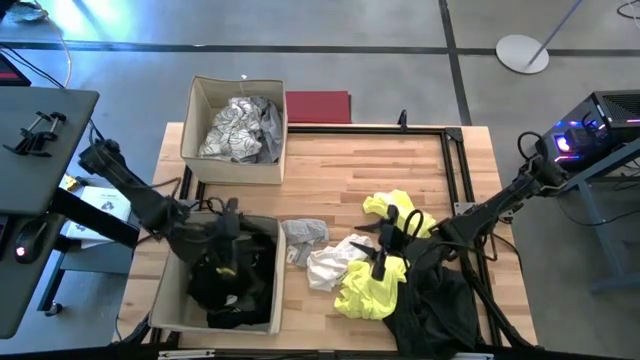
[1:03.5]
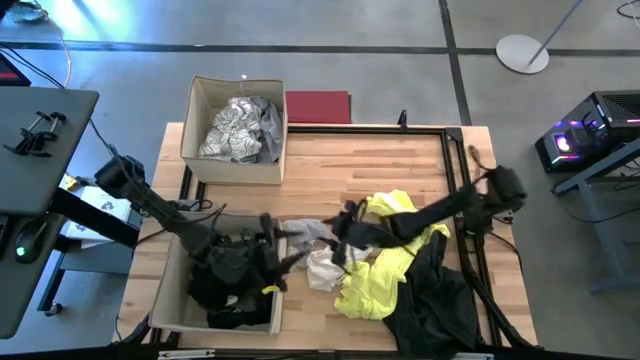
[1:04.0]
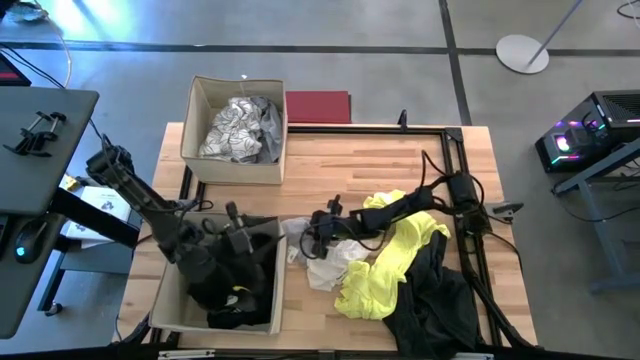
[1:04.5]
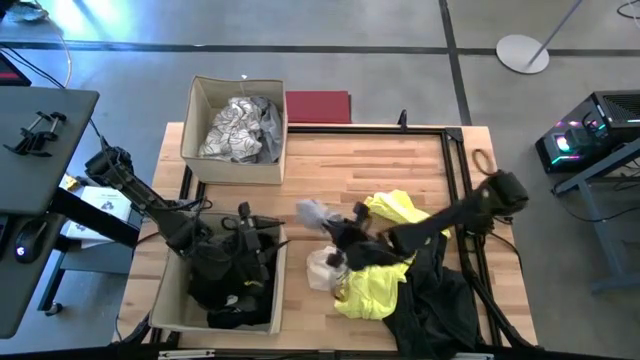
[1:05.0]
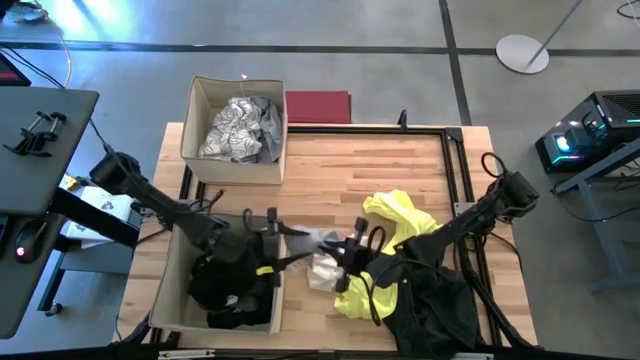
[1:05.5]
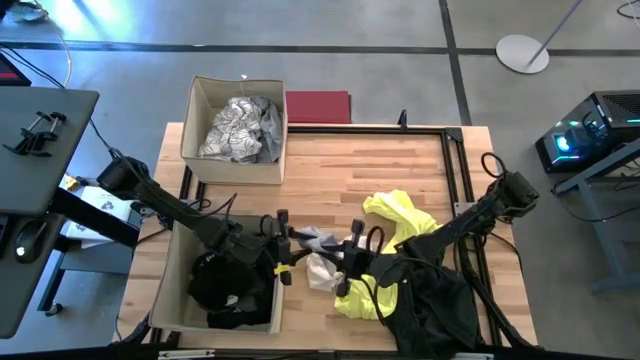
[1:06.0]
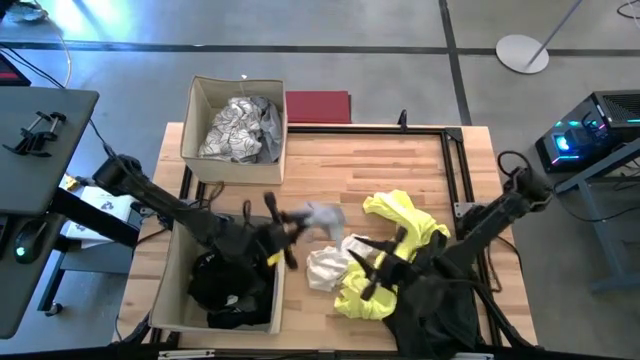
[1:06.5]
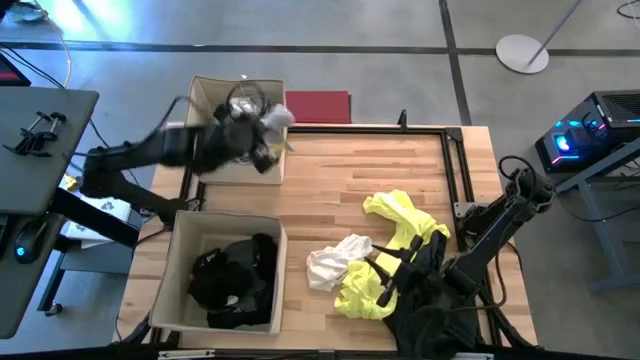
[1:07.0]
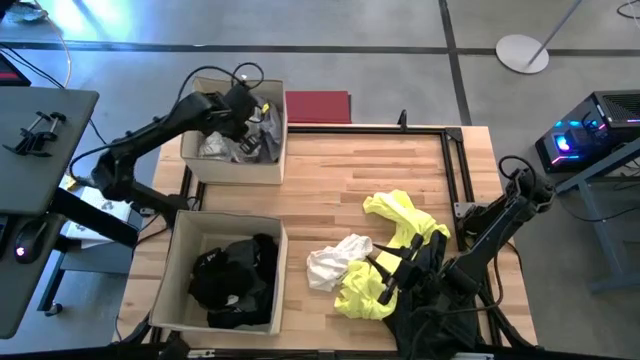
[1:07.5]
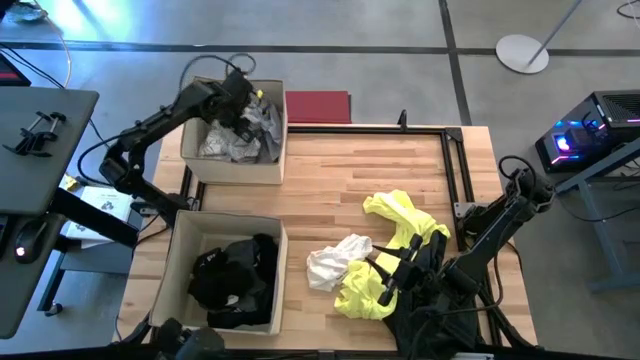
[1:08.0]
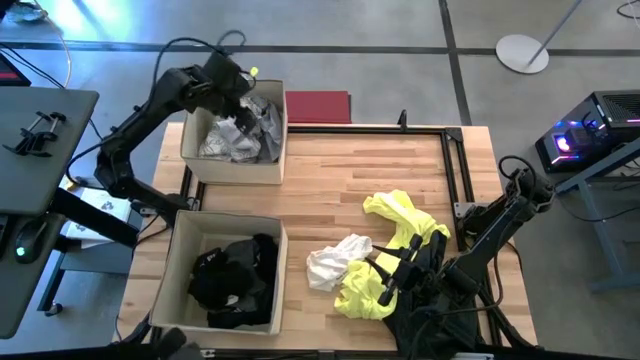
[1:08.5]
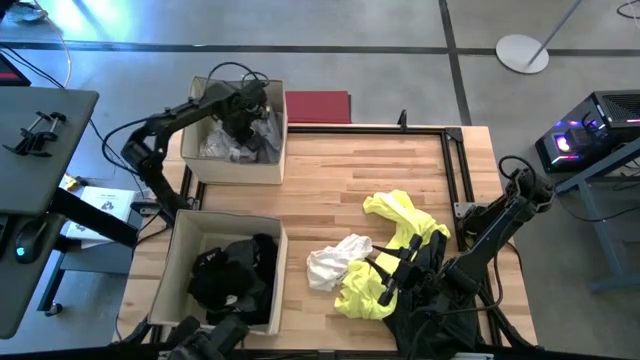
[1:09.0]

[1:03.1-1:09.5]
Task: Sort clothes
Put the gray shorts into the top laundry organizer

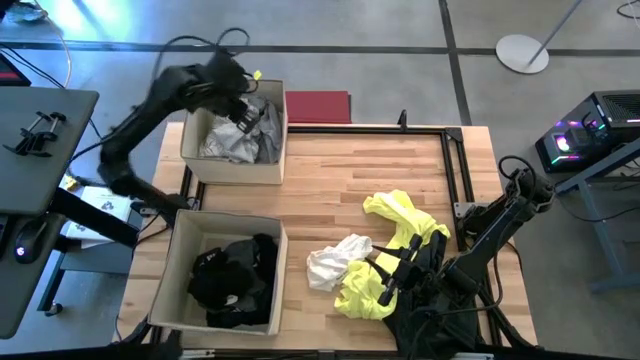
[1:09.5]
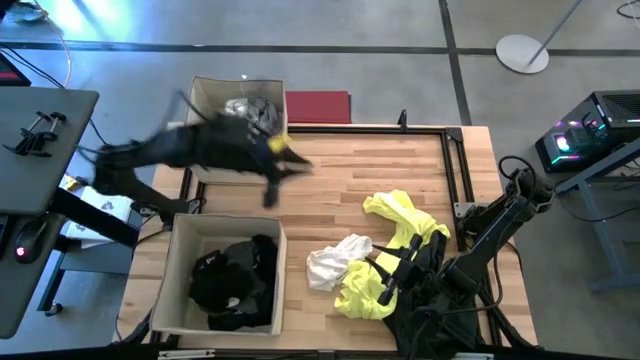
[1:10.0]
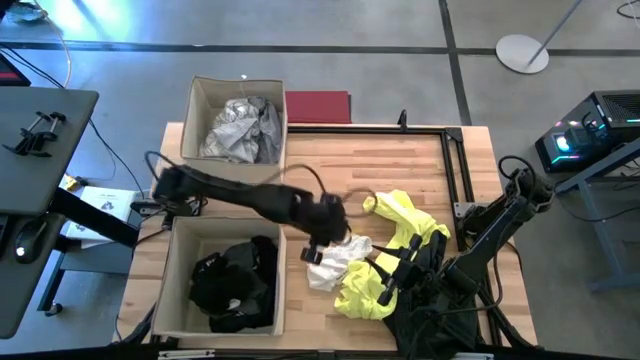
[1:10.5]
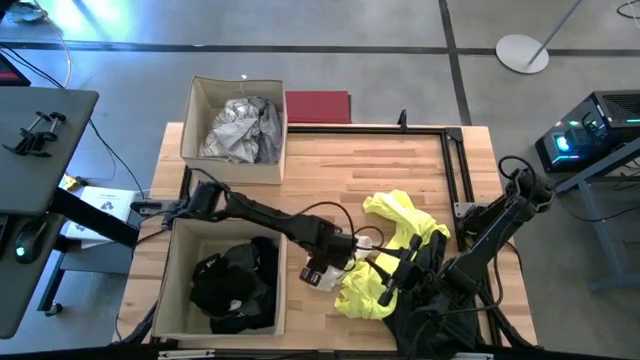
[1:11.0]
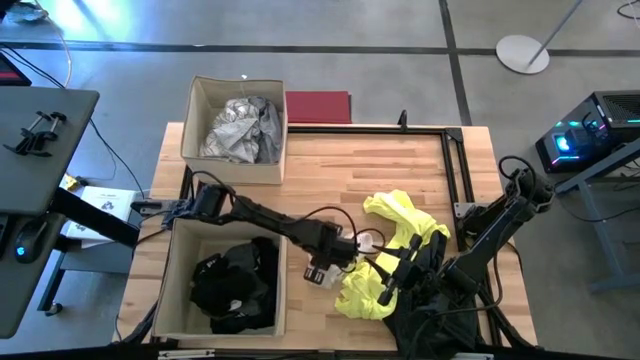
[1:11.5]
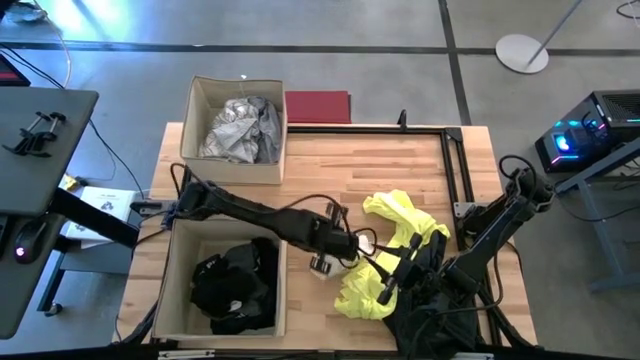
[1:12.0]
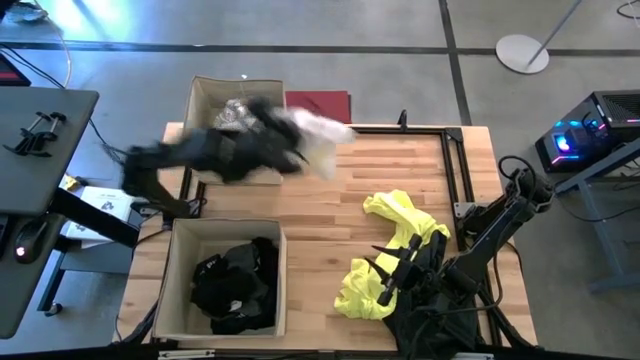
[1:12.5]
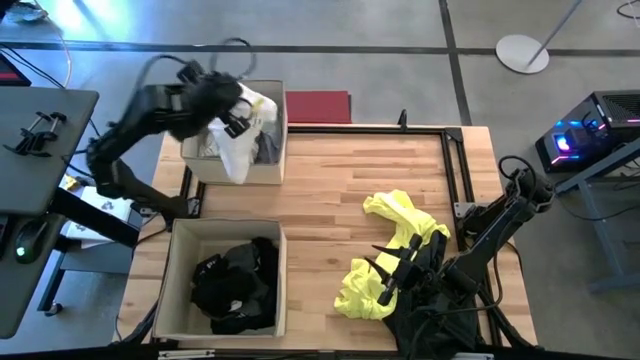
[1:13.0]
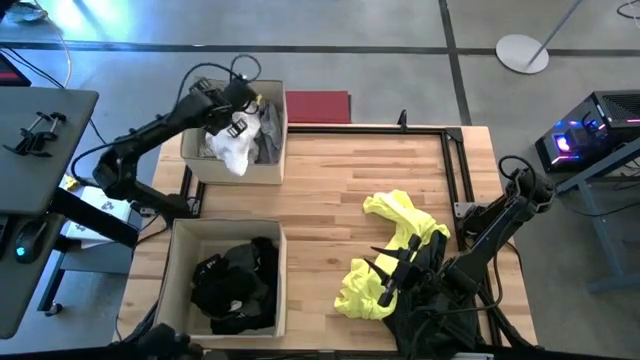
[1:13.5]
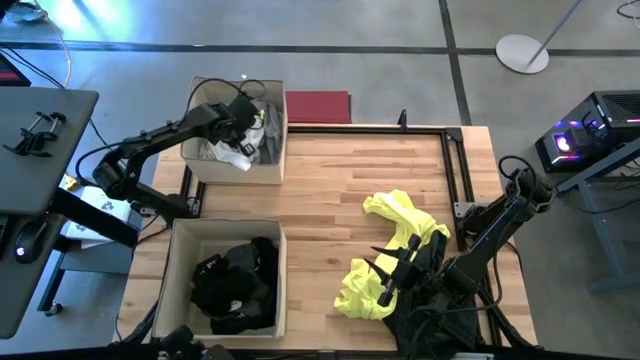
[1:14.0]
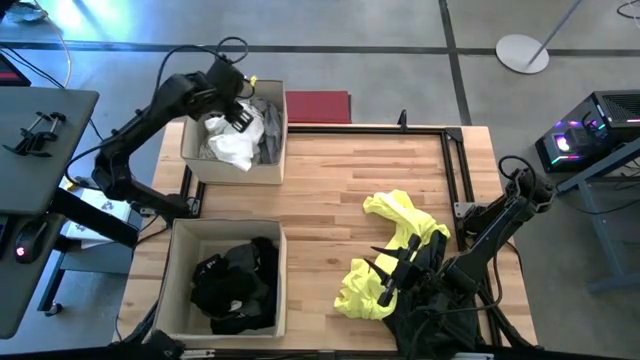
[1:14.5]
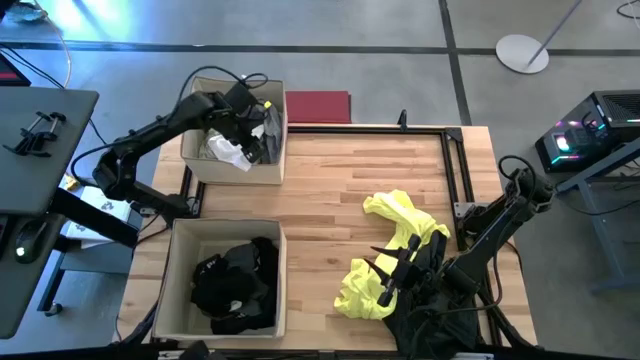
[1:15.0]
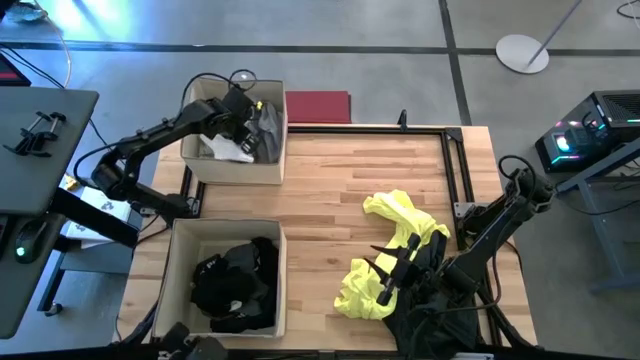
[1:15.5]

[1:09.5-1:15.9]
Put the white shorts into the top laundry organizer

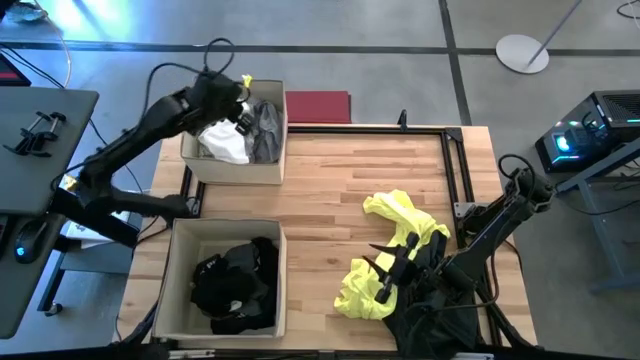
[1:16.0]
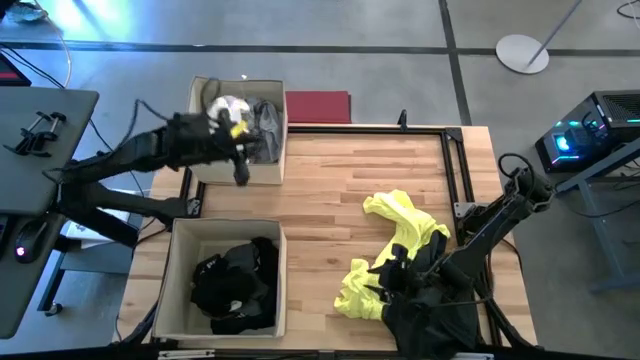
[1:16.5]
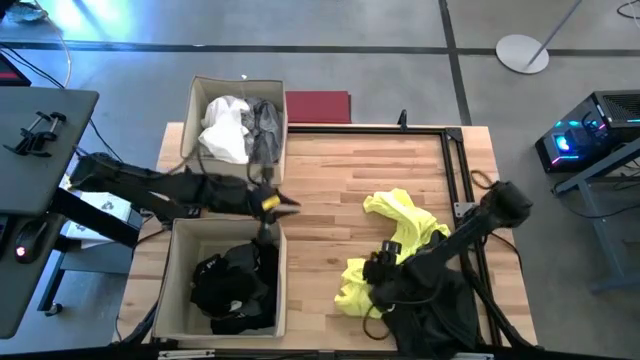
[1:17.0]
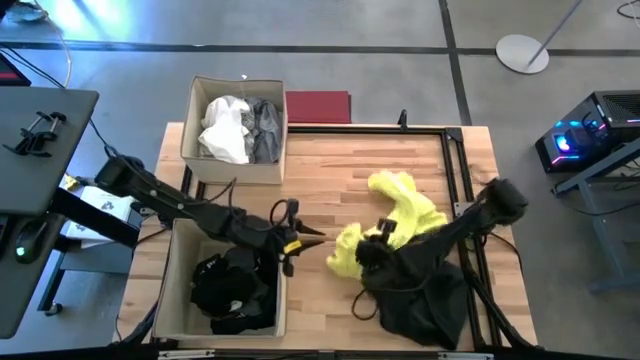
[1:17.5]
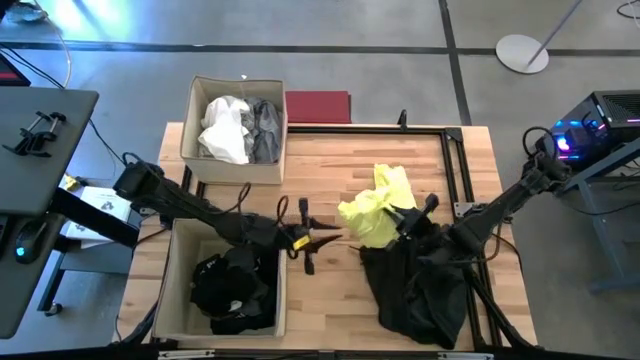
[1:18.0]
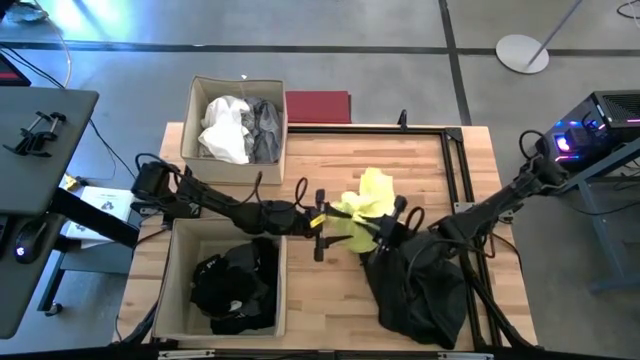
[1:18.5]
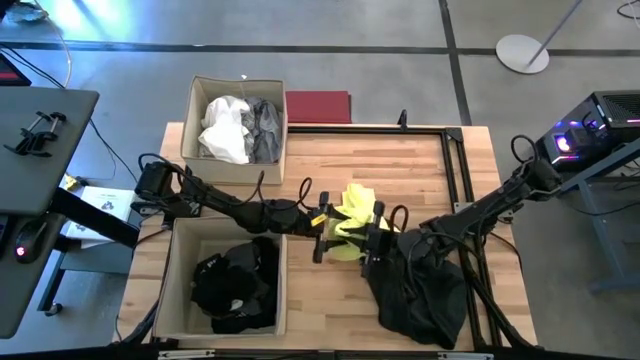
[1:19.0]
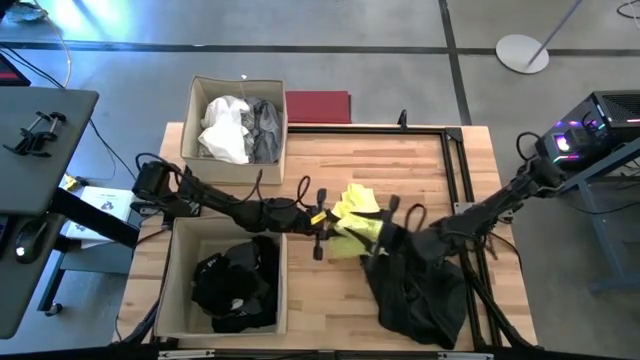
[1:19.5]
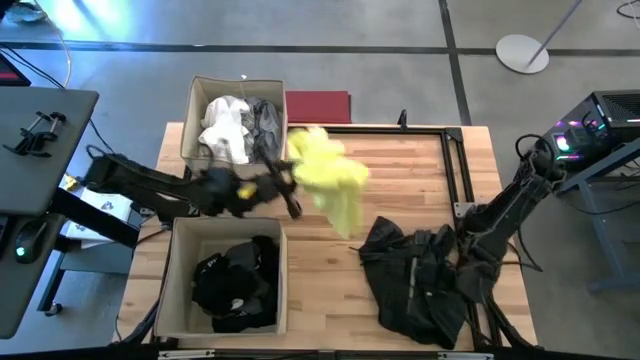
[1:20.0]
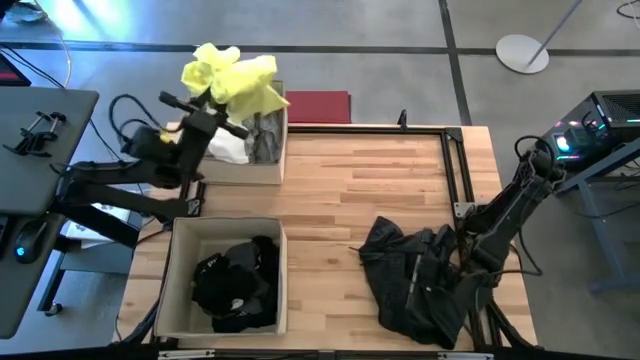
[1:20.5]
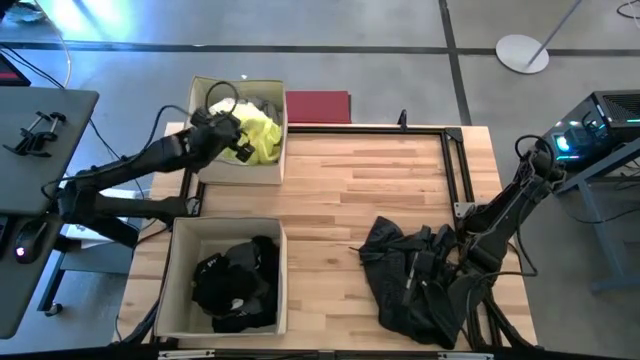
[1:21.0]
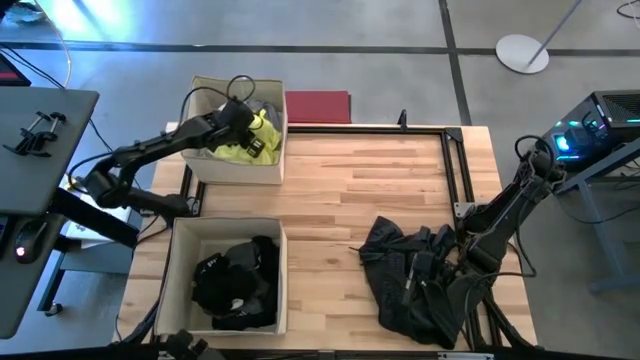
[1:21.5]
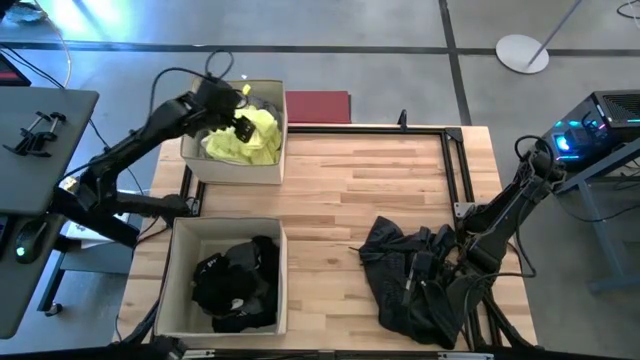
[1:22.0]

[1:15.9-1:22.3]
Put the yellow towel into the top laundry organizer

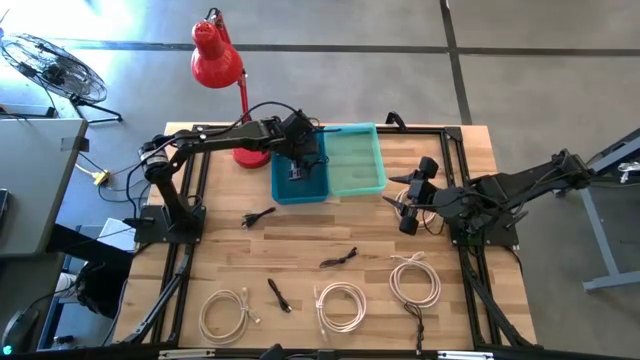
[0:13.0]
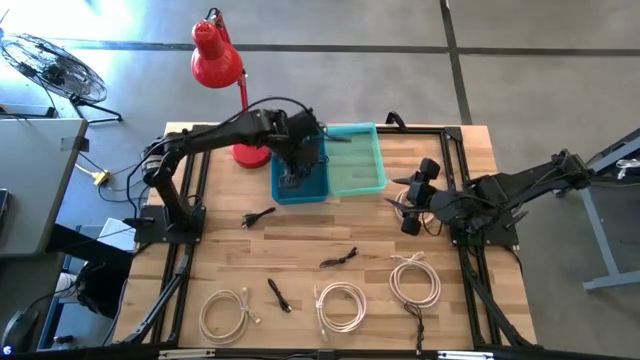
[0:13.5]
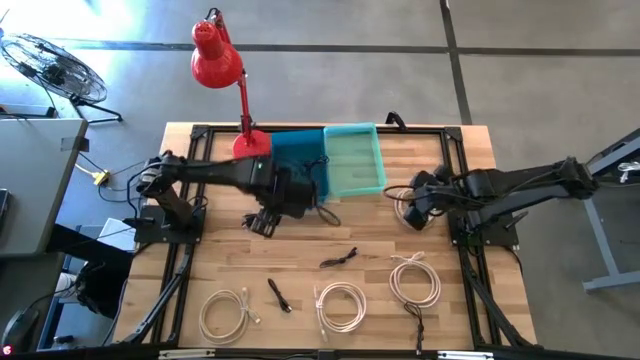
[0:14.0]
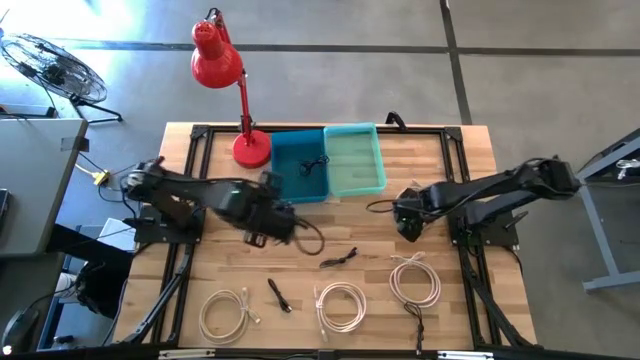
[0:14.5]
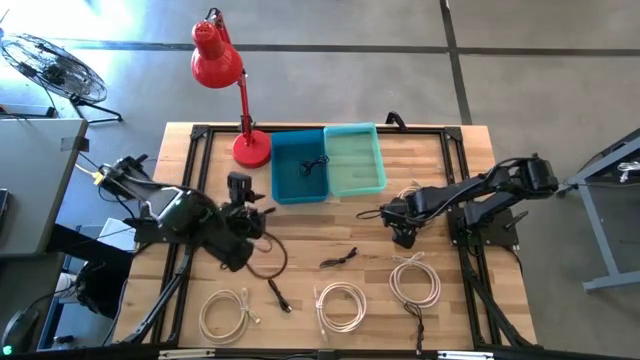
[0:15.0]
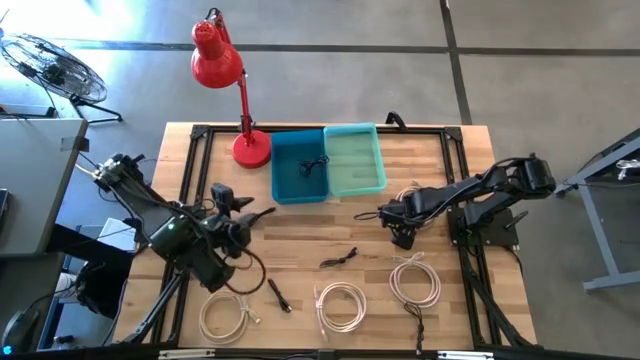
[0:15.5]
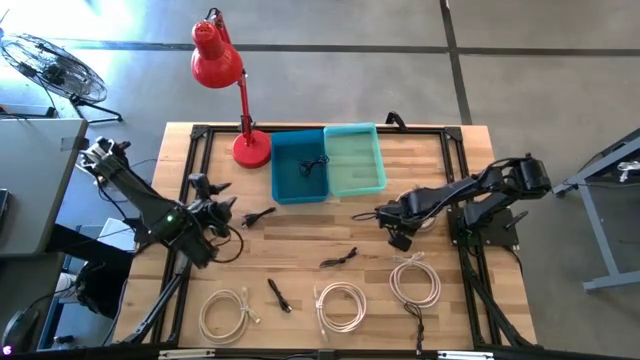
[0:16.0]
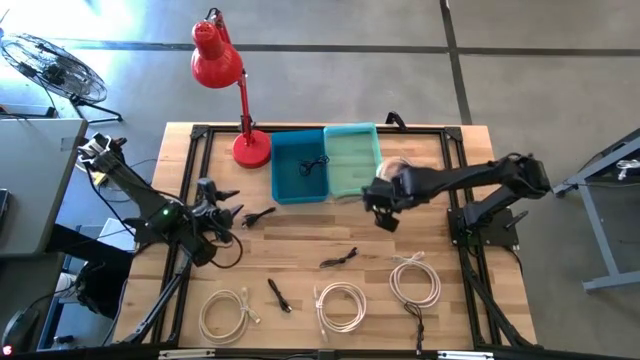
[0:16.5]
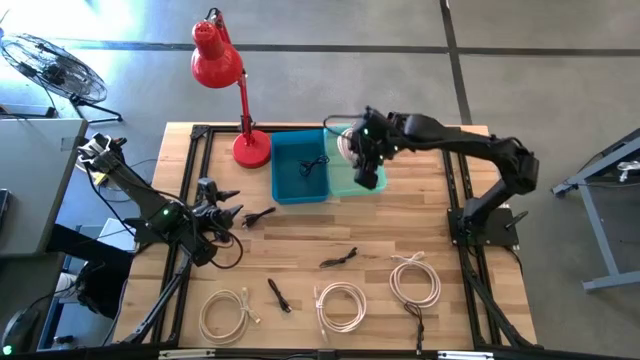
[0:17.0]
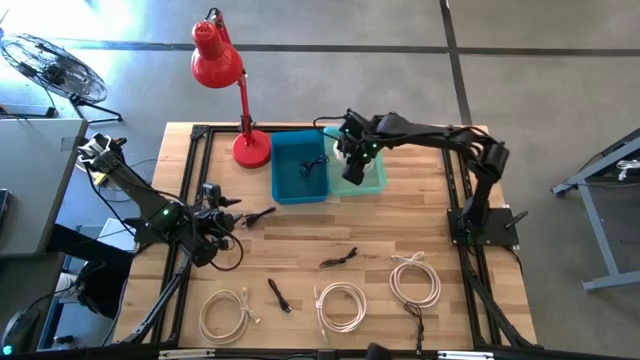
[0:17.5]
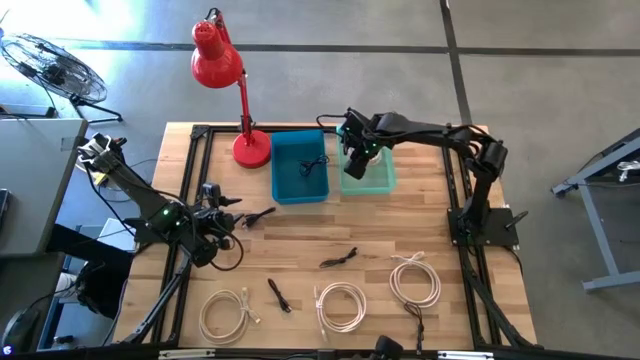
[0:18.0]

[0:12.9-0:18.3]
Task: Pick & Place USB Port
Put the white hdmi cable into the green bin
